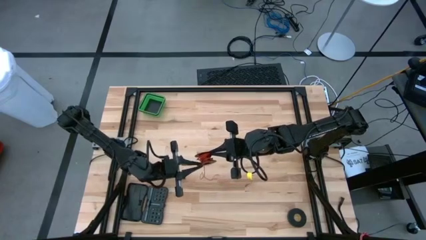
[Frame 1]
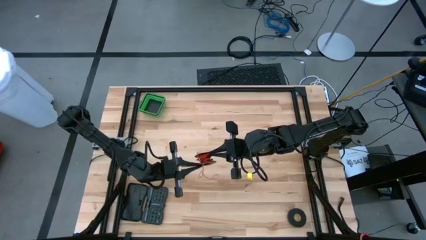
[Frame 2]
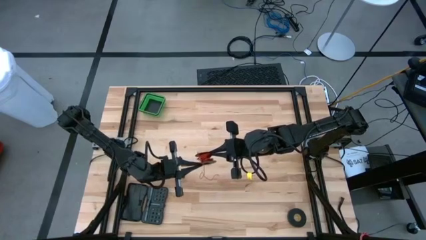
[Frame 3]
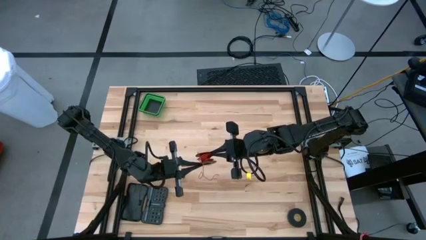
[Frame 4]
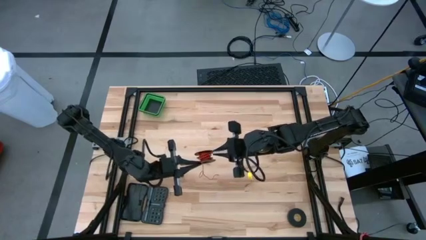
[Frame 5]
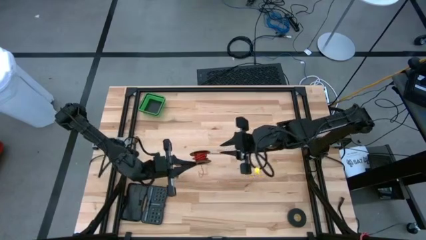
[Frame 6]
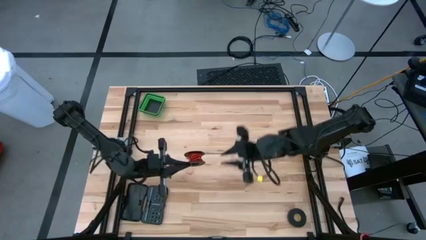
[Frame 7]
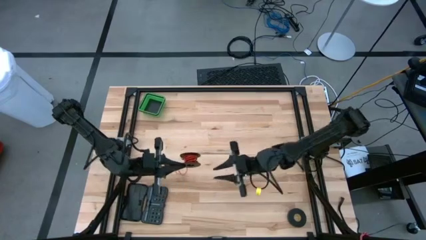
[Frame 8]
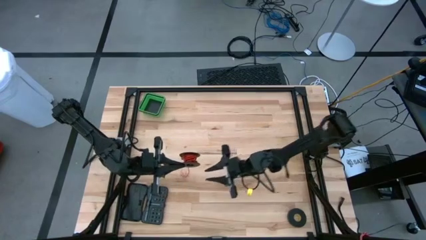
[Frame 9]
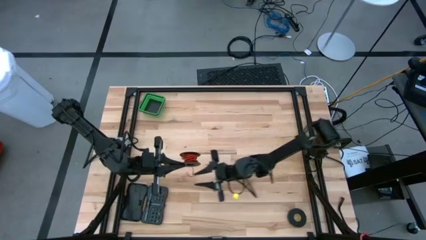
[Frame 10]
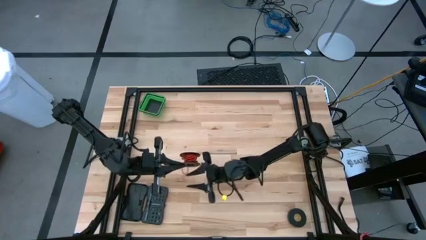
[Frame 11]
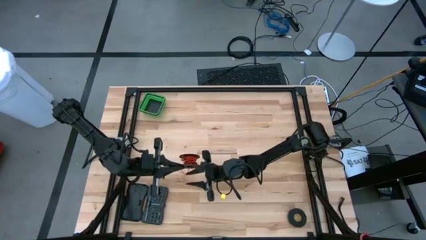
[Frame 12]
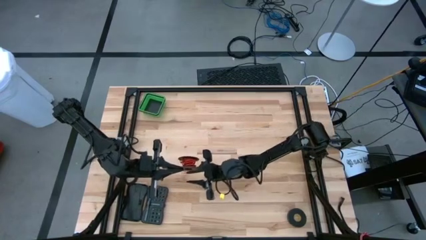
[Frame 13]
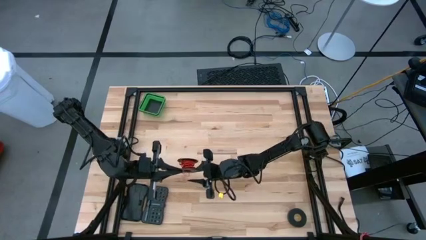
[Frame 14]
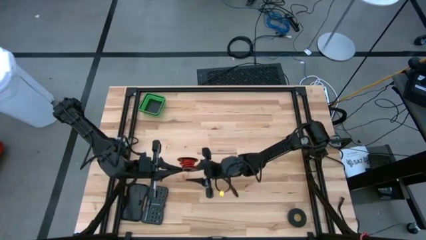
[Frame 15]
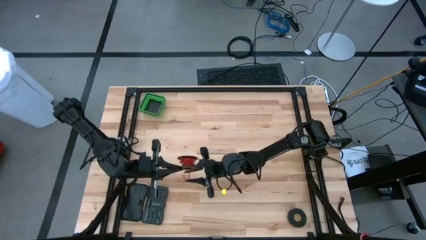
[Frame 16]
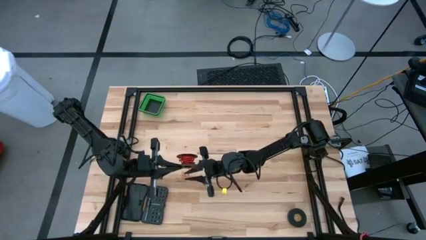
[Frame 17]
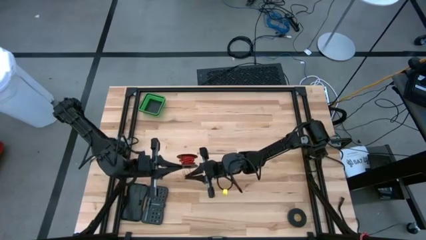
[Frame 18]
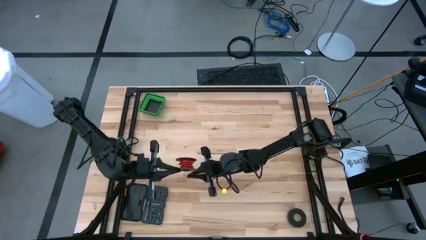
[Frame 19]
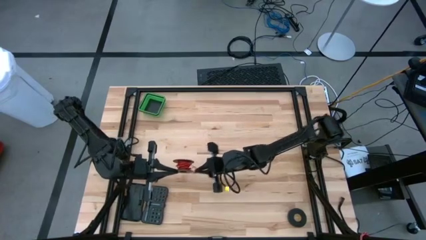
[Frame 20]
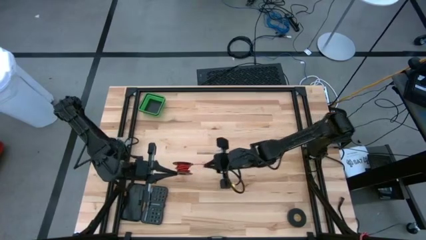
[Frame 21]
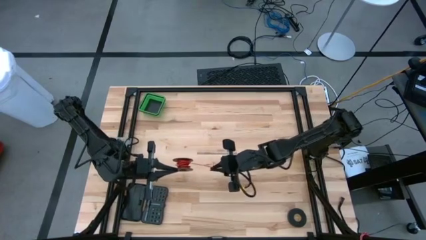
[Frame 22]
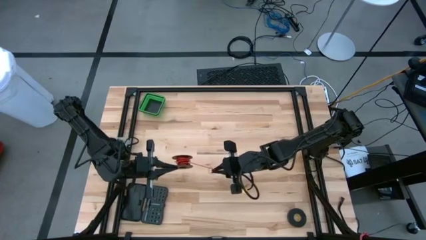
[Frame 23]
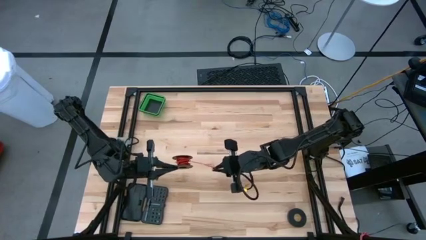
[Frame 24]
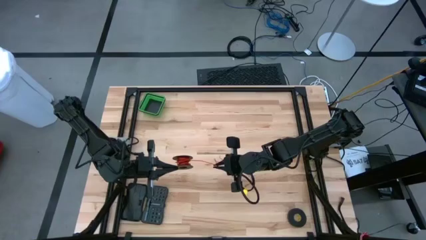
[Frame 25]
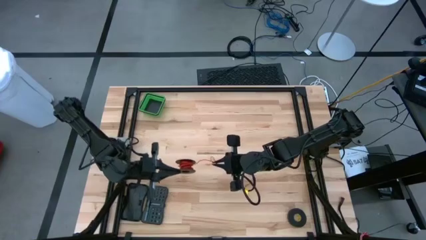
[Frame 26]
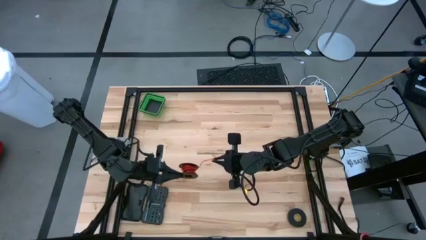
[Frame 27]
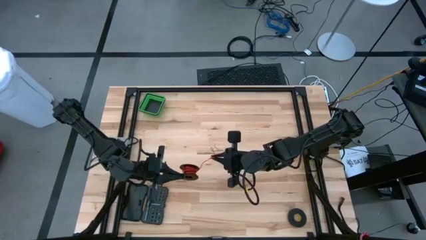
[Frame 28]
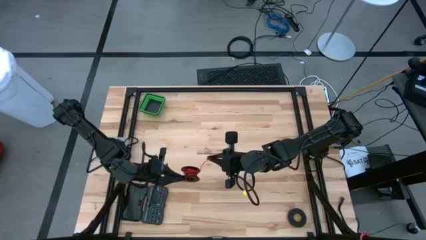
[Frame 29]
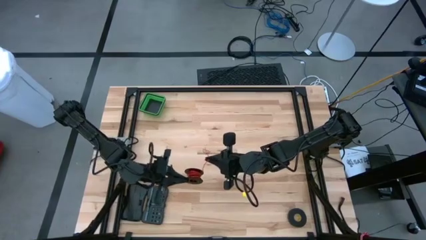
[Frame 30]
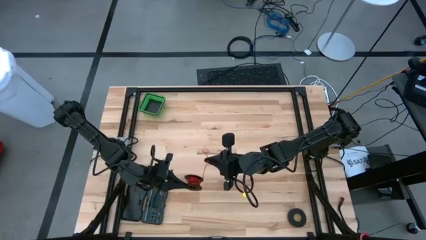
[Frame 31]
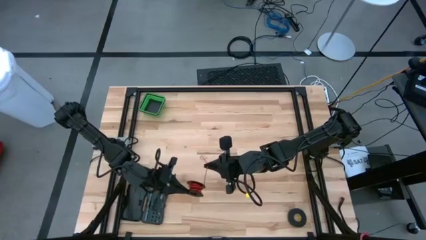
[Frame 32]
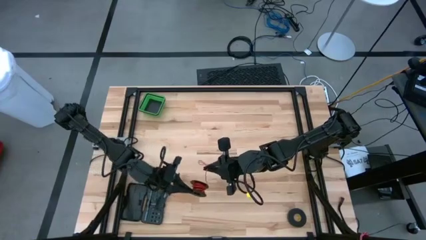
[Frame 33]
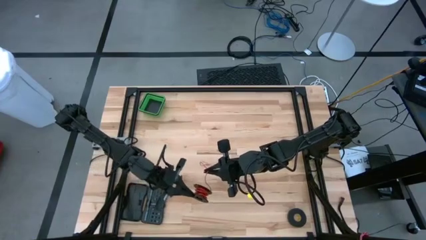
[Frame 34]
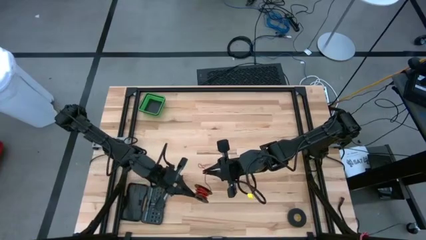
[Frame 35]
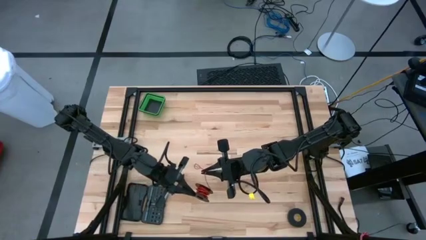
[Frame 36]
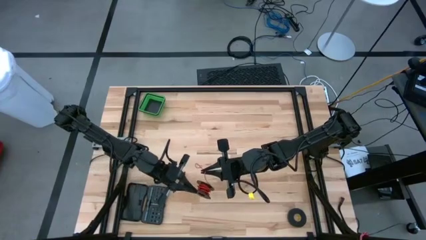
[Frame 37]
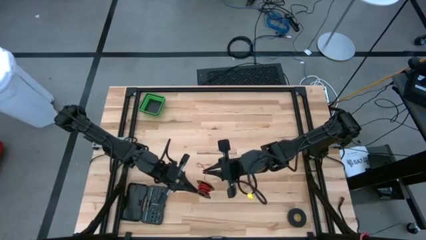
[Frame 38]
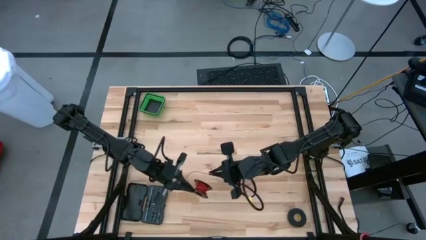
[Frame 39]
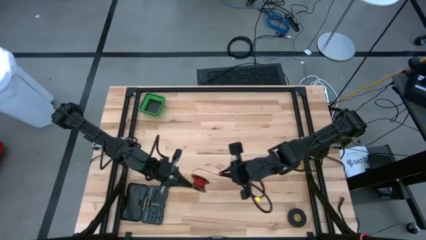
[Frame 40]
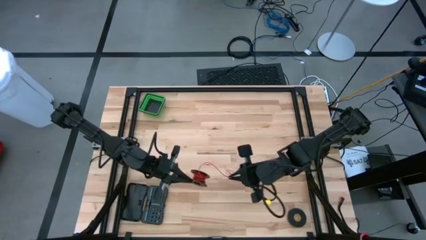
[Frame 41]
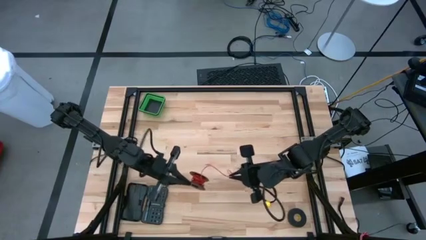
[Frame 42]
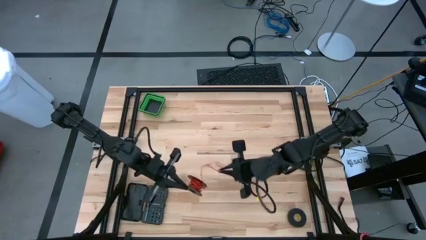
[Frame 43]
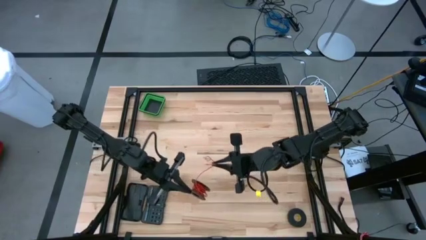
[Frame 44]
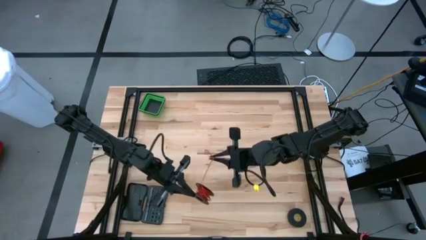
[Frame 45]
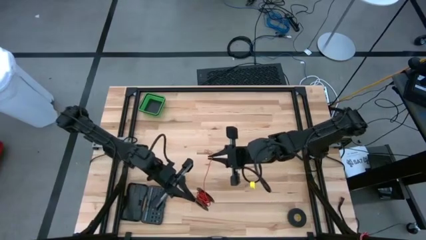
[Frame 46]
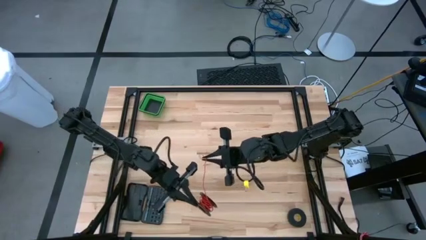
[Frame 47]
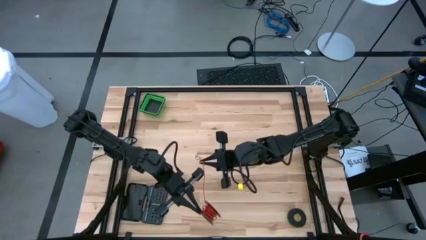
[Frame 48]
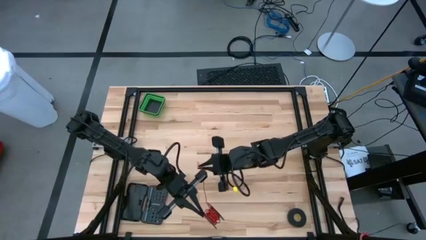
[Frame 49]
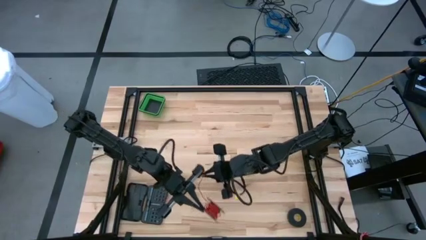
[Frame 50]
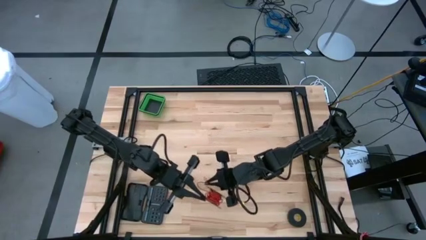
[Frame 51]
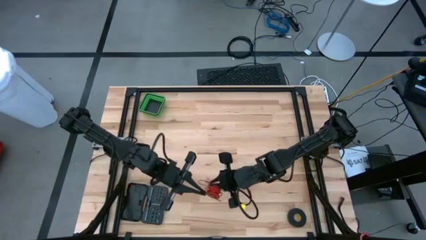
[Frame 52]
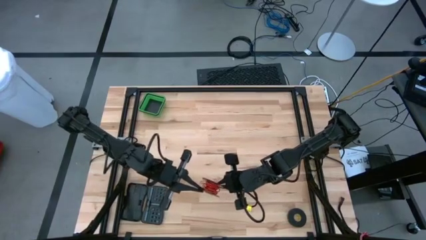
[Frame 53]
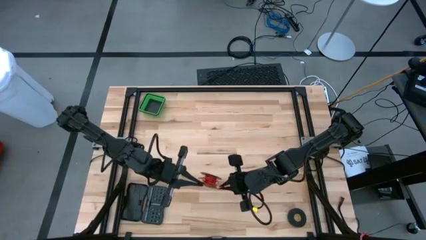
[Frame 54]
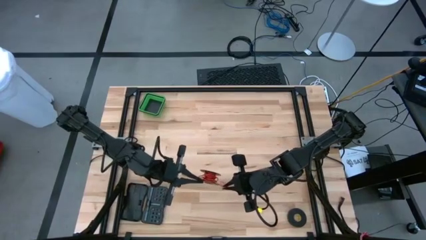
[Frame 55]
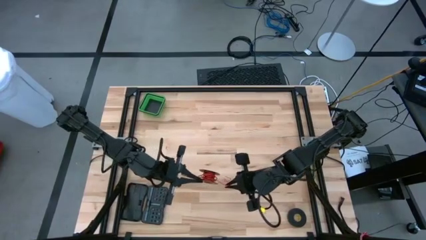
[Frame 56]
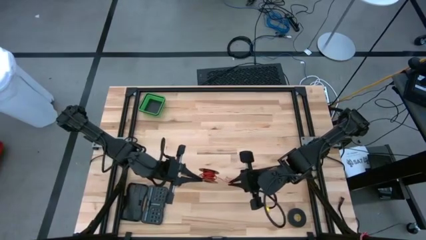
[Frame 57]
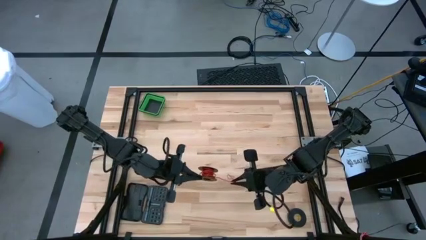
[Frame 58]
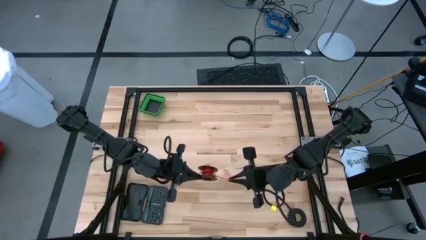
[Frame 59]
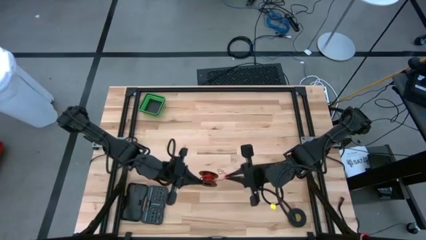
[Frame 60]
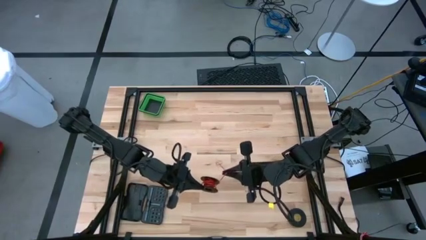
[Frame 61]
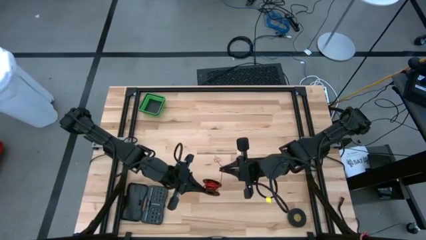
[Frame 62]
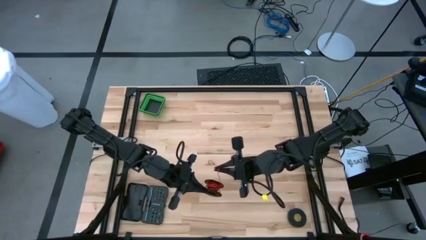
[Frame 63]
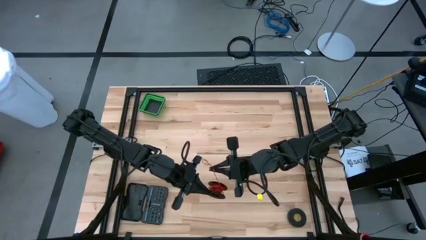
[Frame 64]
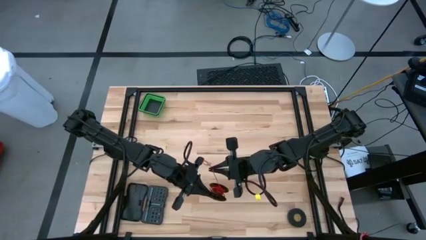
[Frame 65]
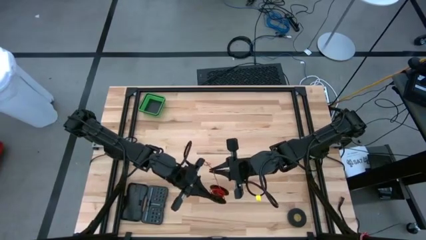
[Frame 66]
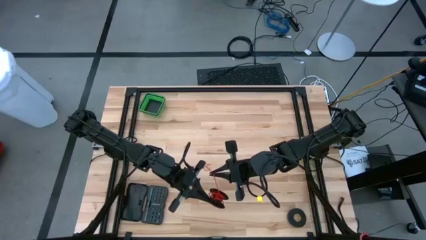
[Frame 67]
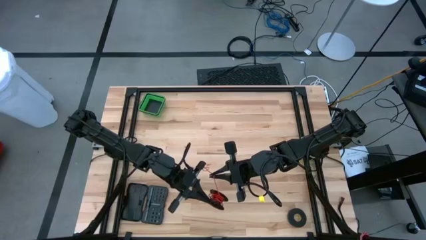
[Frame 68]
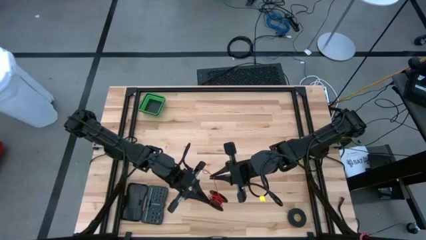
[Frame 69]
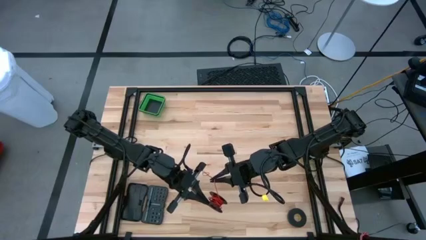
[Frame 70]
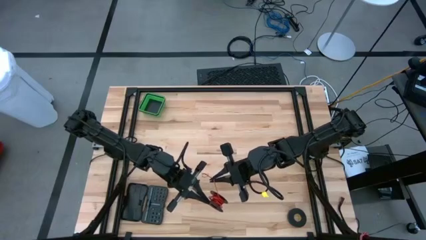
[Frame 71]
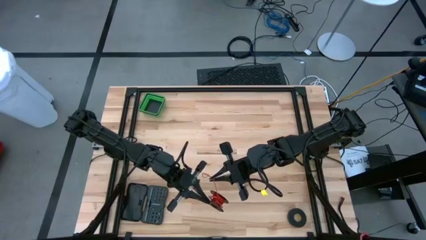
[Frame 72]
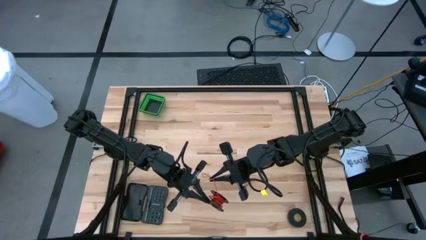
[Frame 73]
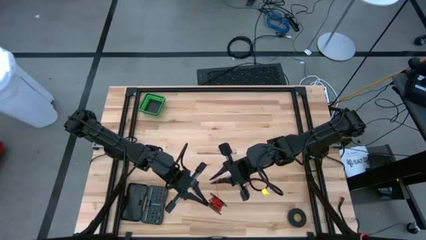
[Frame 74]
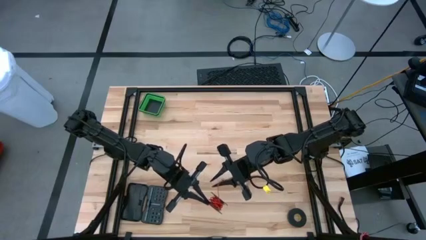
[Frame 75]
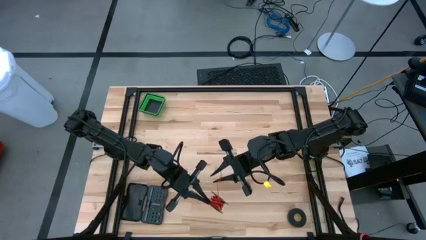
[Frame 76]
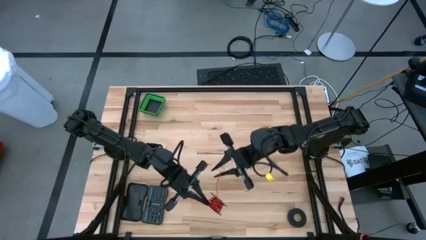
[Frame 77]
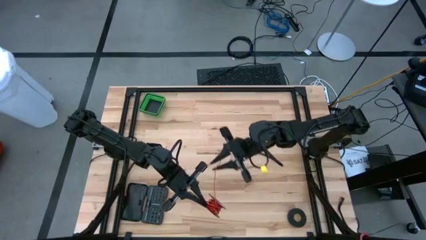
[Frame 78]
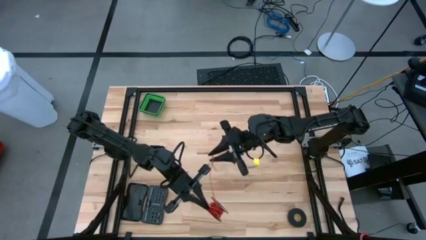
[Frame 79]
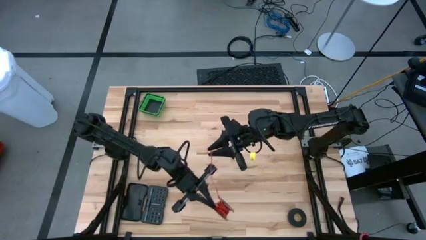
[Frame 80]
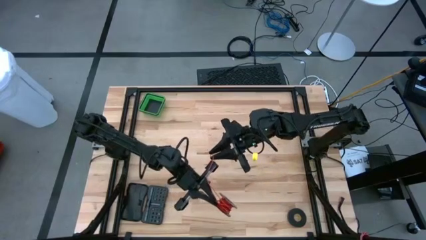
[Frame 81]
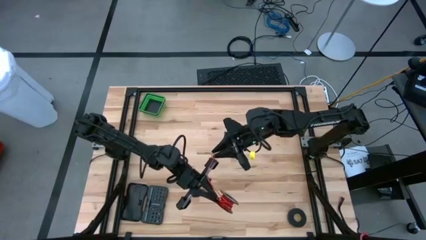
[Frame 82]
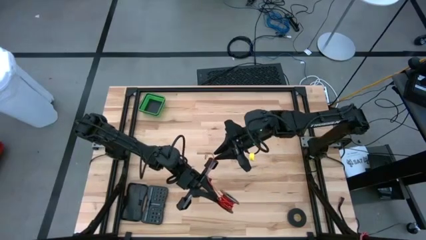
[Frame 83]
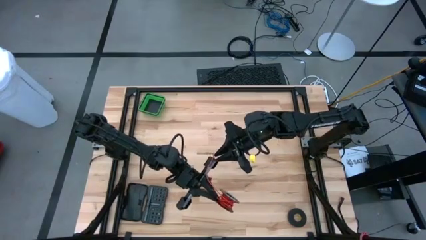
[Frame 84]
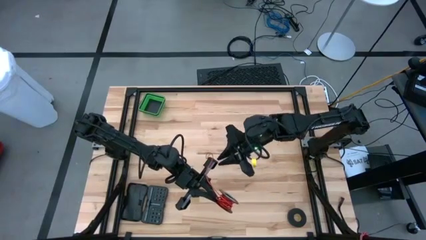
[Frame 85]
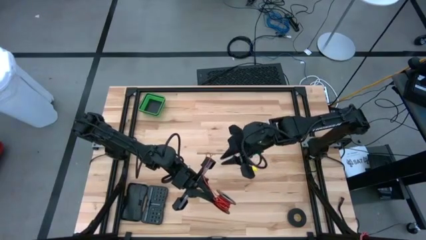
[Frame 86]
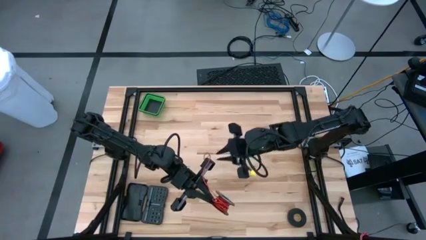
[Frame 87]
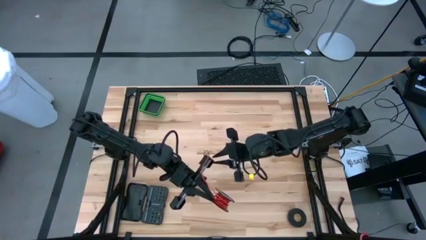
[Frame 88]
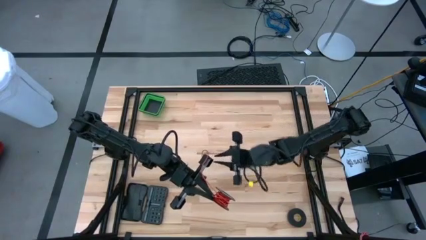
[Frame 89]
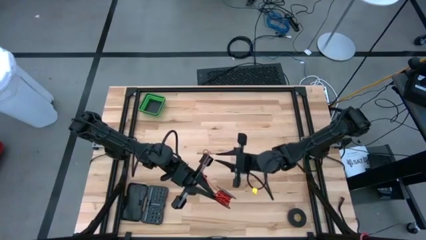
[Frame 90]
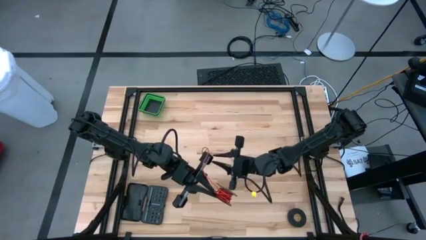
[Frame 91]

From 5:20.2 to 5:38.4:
Task: Coil cords
Coil the red wire into the spool
